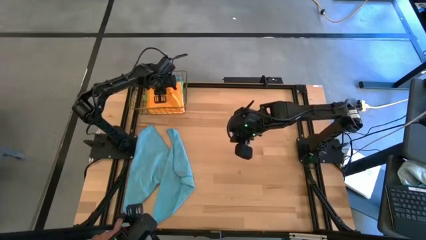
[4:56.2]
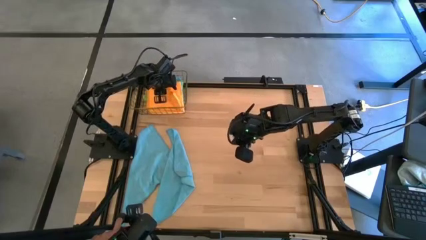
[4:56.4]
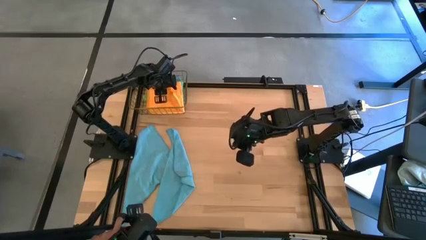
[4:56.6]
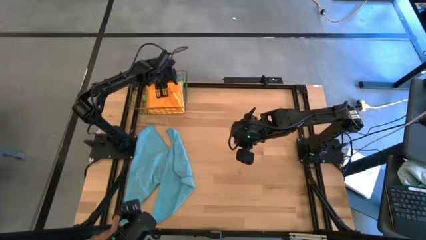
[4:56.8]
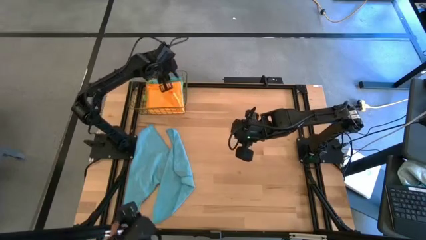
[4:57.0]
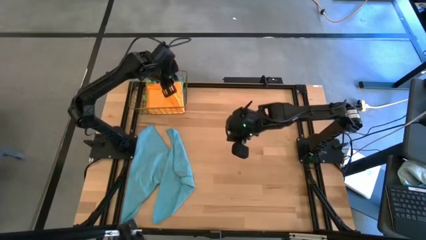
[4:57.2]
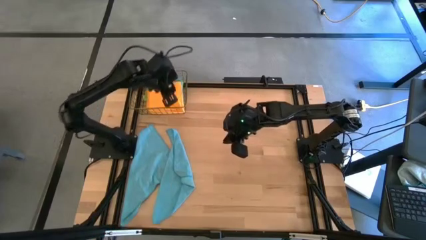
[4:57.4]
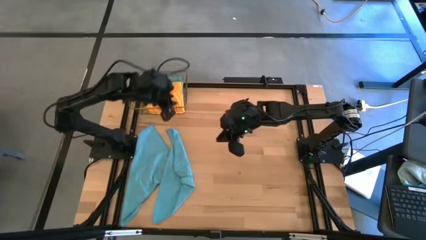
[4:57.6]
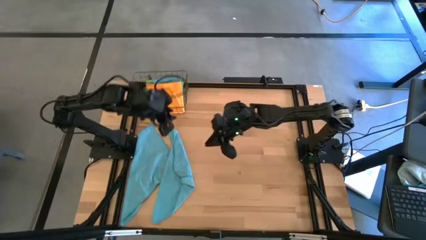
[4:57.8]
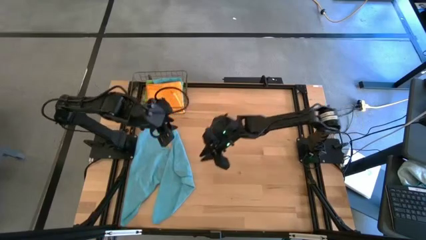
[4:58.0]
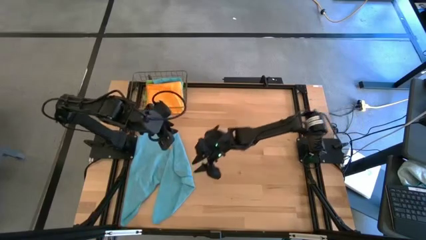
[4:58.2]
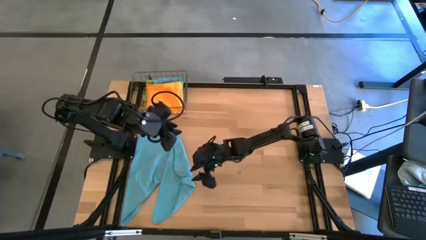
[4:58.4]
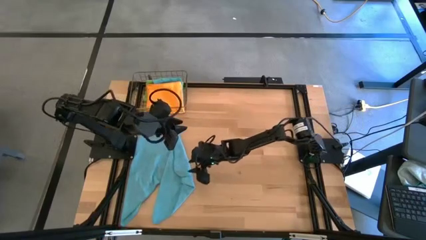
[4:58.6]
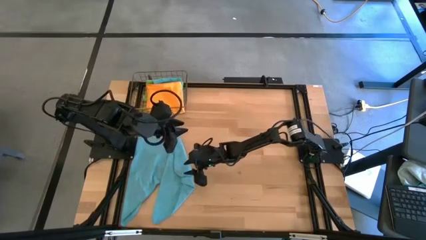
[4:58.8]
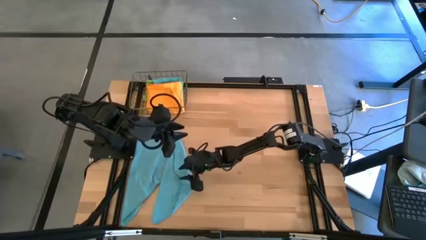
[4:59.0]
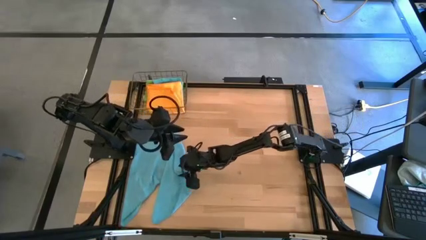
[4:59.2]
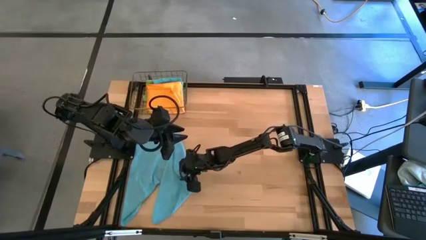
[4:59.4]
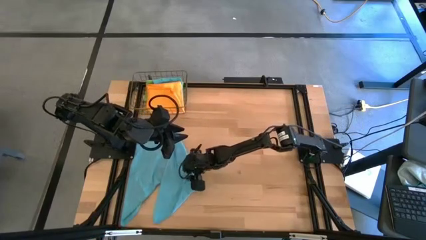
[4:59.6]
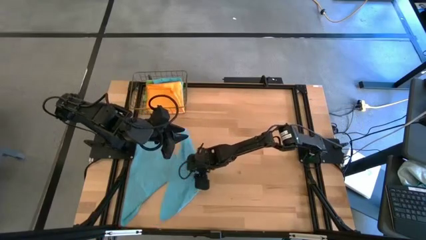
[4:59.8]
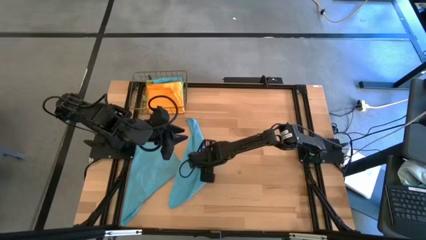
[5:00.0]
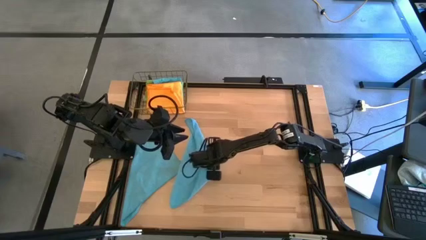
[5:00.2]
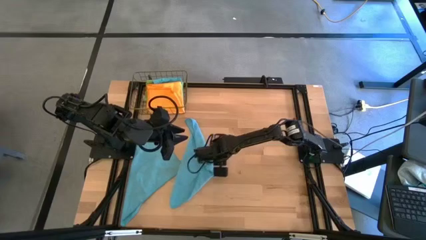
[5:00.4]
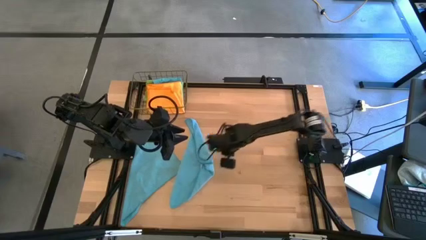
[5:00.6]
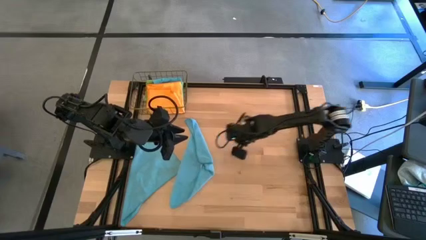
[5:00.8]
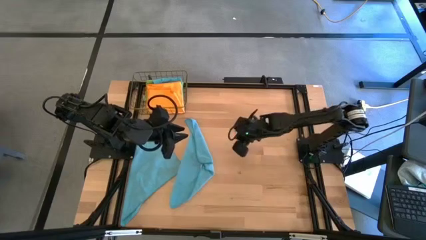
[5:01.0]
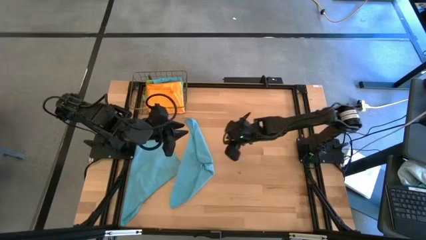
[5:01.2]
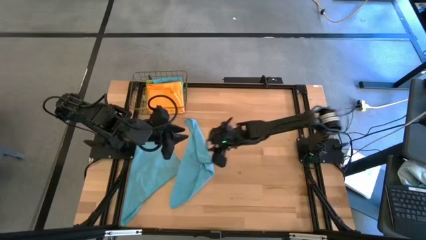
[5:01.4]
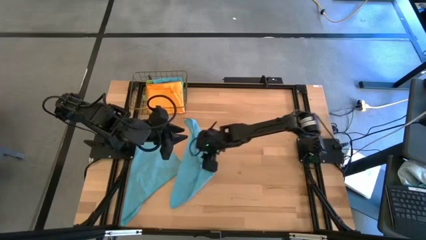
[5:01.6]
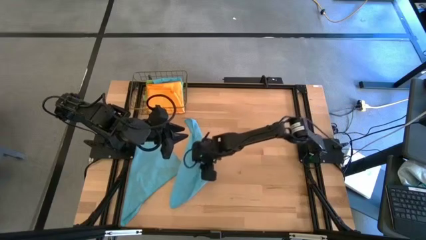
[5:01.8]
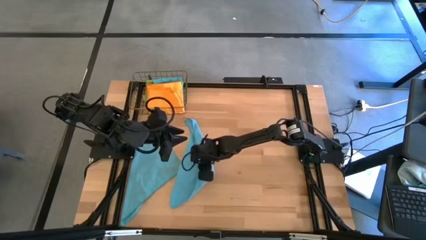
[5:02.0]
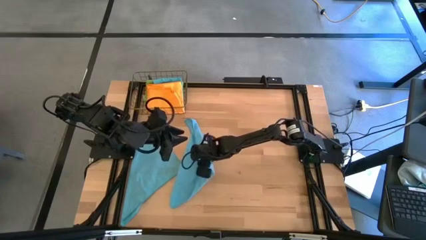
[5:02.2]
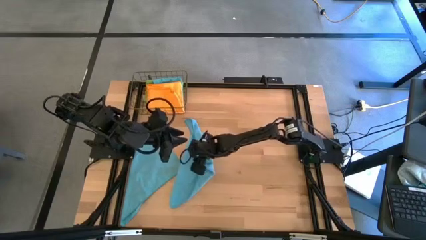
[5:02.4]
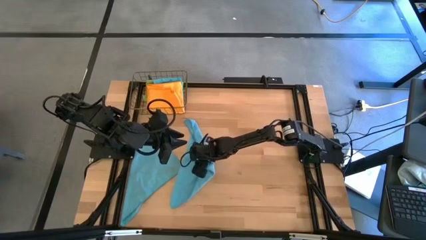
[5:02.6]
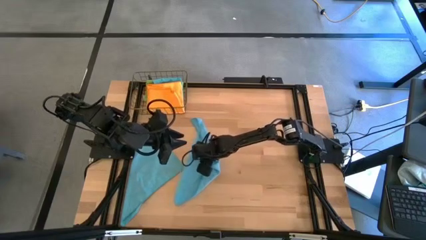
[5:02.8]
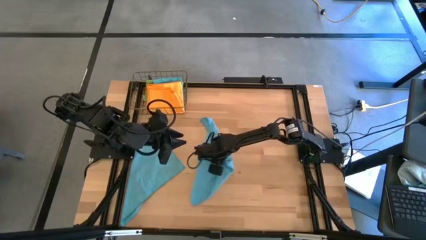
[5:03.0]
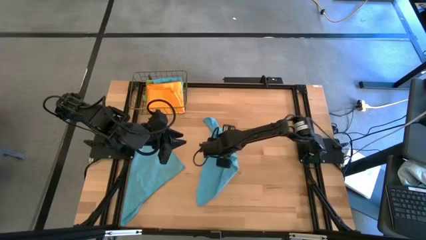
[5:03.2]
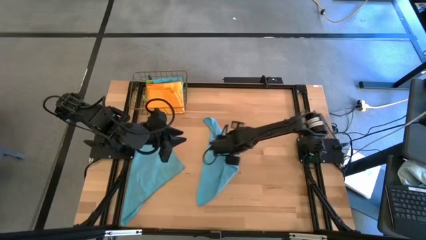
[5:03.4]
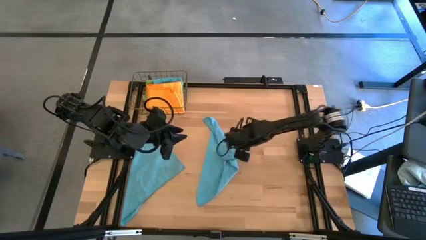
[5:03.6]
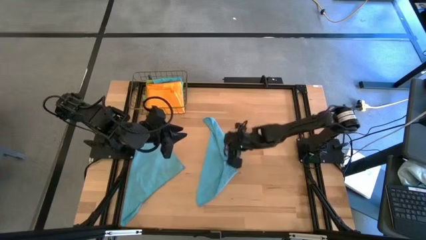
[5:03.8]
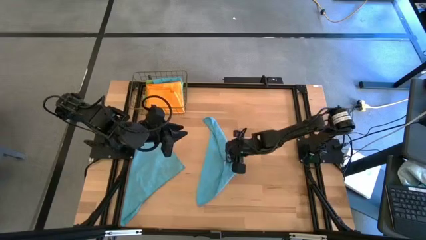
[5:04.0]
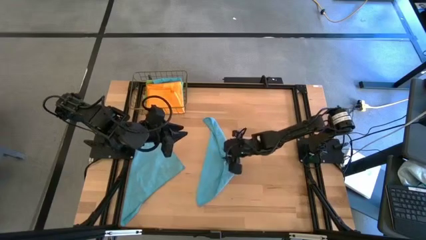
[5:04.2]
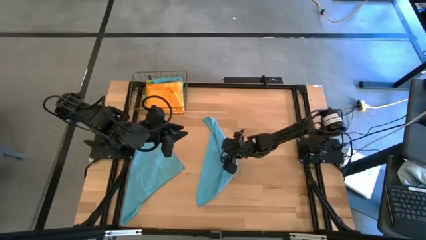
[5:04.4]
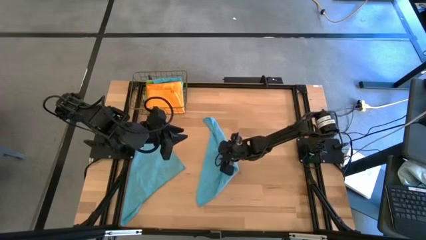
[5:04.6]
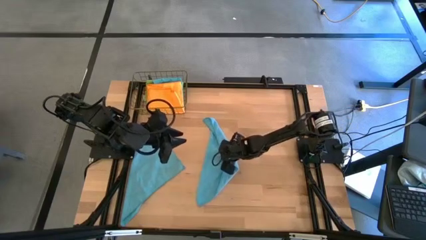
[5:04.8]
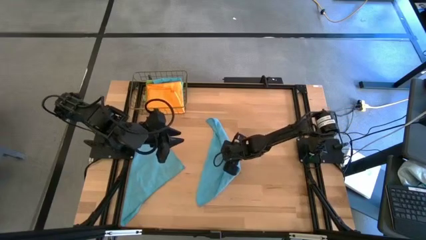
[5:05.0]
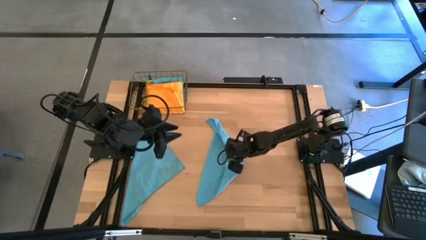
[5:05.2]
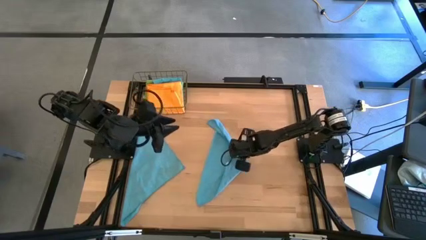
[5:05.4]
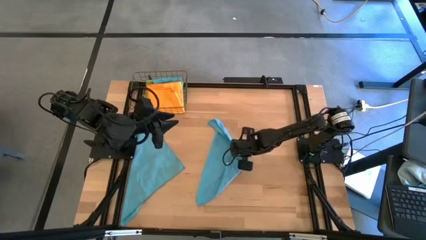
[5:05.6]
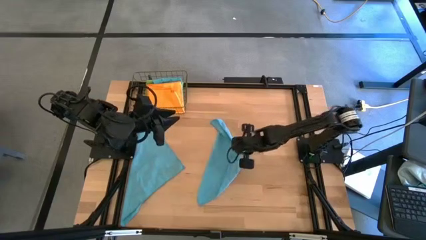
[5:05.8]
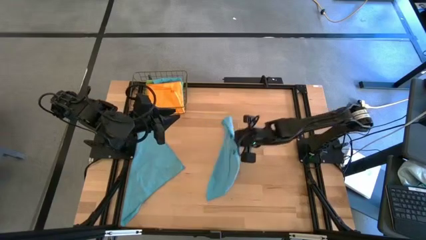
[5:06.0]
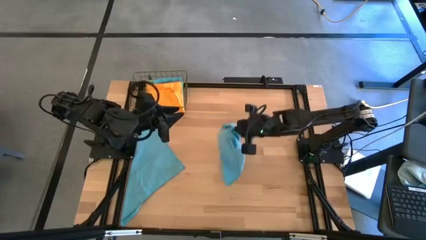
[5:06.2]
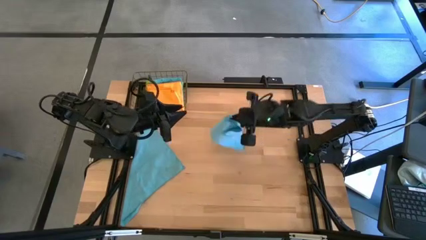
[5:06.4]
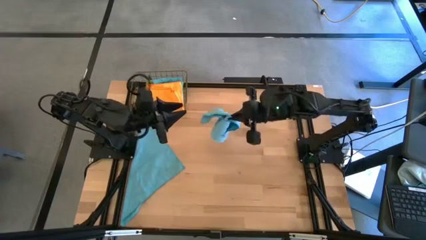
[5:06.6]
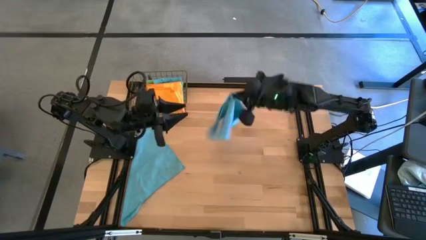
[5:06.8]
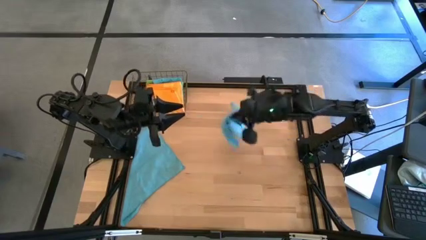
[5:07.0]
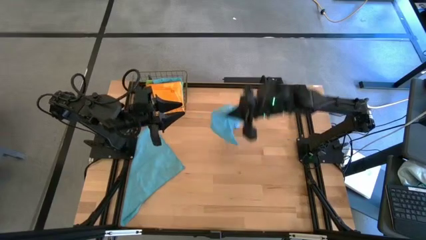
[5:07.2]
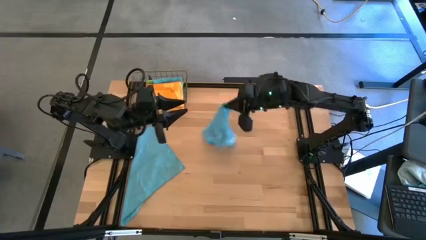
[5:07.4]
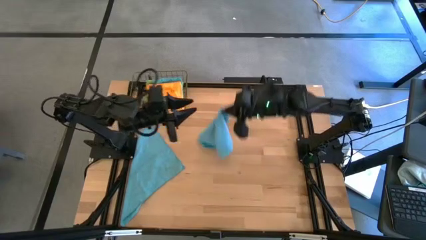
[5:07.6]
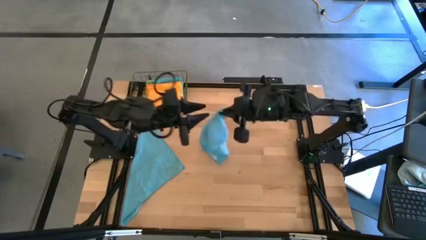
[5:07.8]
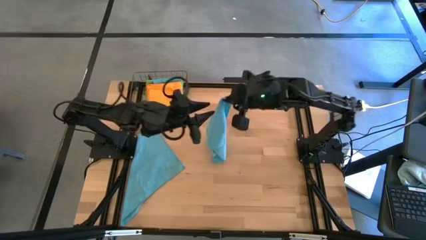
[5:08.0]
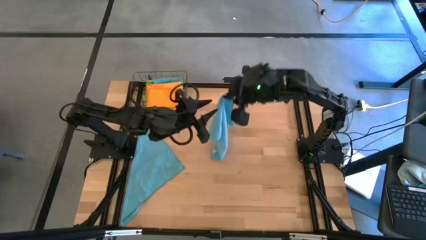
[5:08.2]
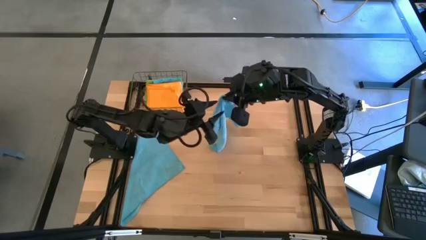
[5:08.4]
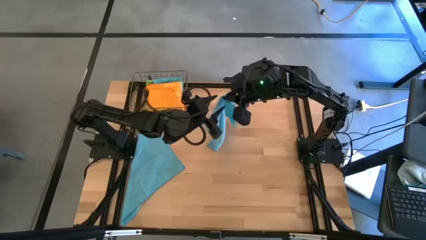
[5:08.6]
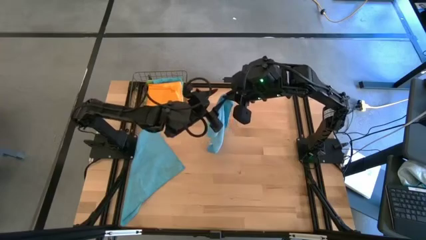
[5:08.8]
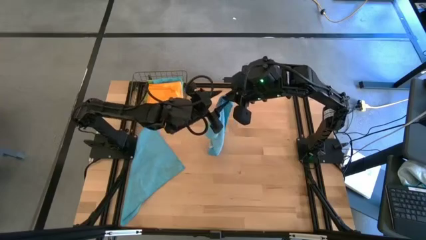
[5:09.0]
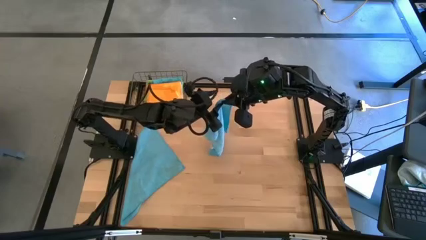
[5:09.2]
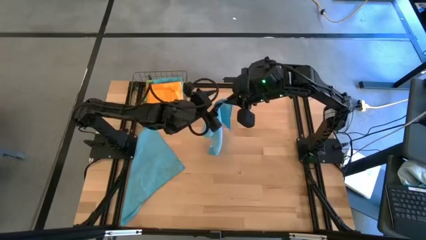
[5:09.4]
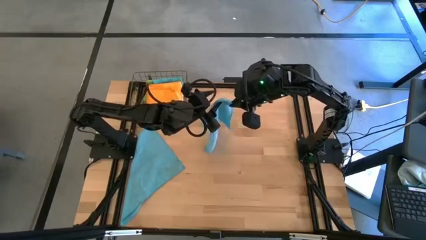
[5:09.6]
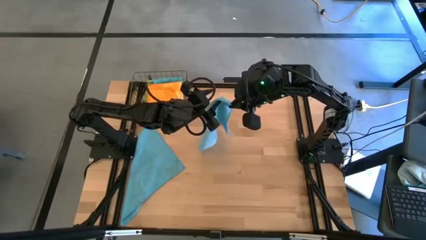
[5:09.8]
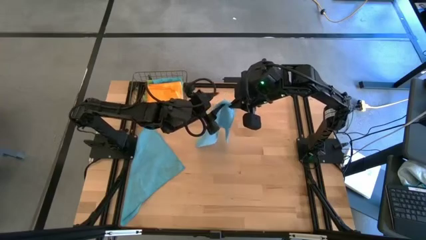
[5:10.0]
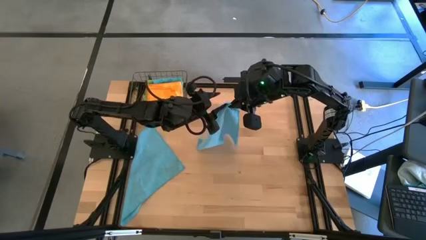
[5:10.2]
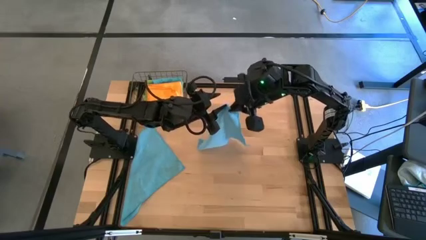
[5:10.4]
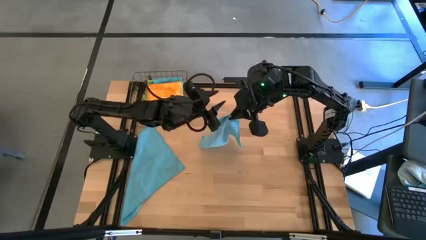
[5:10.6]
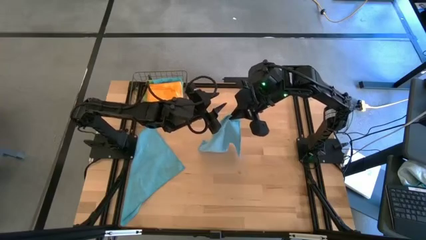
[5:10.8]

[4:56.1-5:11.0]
Task: Fold microfiber towels
Fold the right light blue microfiber cloth
